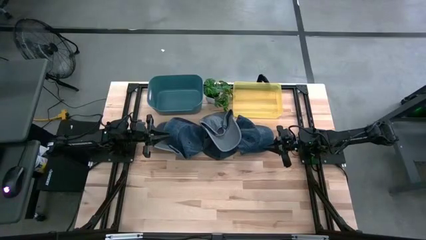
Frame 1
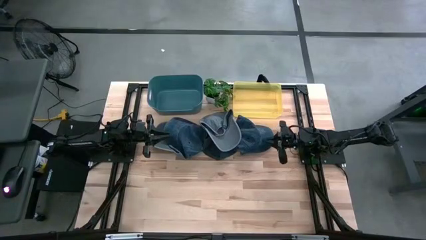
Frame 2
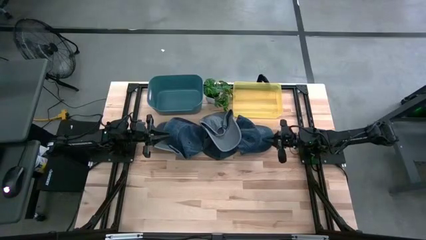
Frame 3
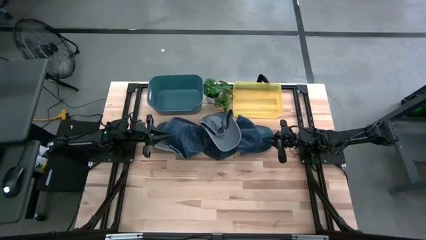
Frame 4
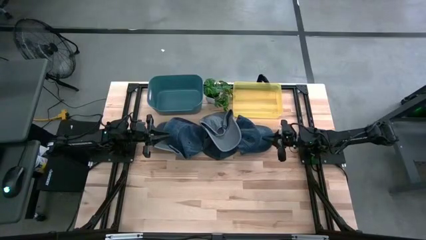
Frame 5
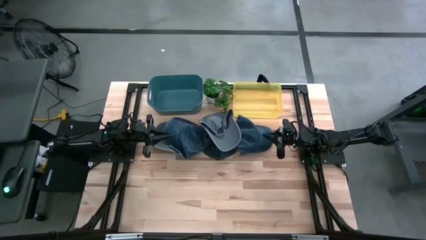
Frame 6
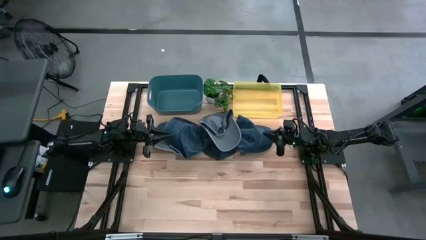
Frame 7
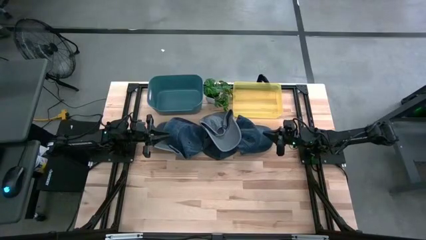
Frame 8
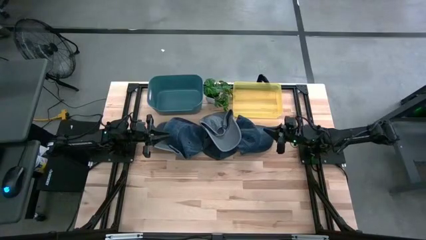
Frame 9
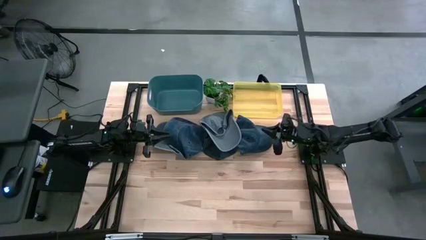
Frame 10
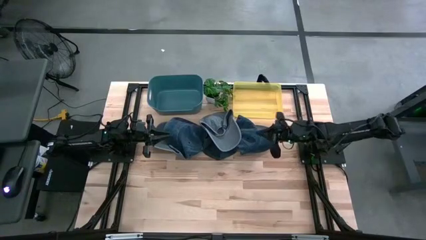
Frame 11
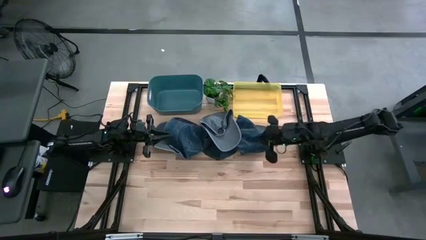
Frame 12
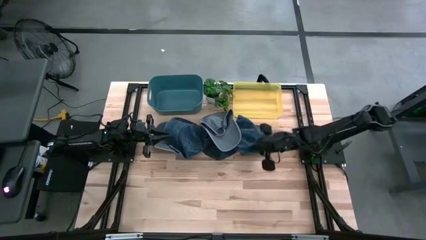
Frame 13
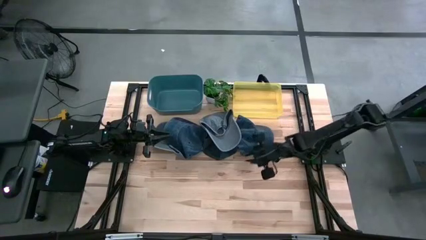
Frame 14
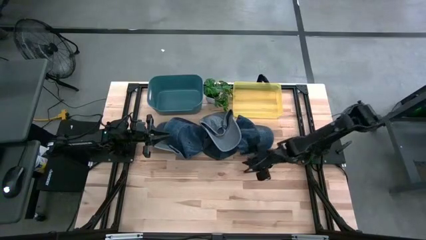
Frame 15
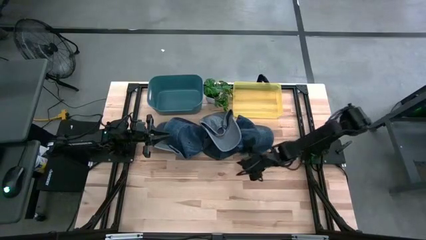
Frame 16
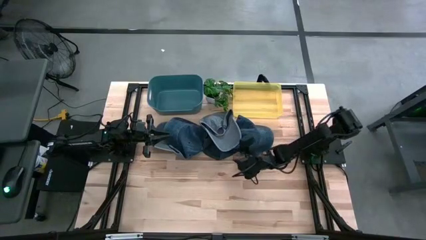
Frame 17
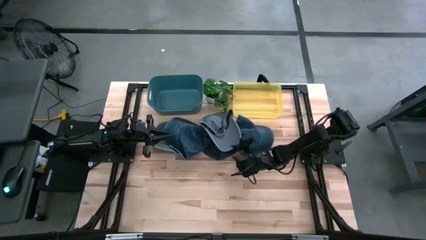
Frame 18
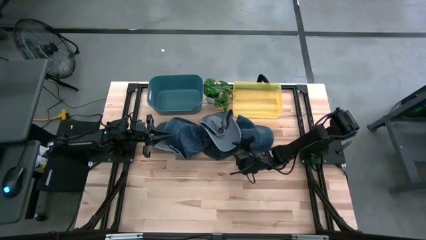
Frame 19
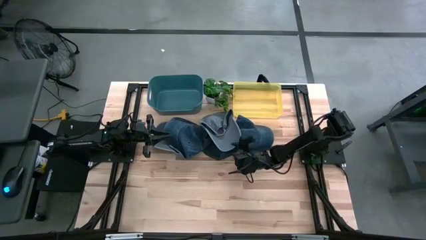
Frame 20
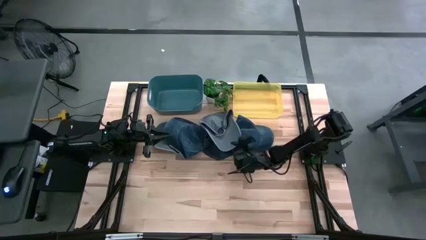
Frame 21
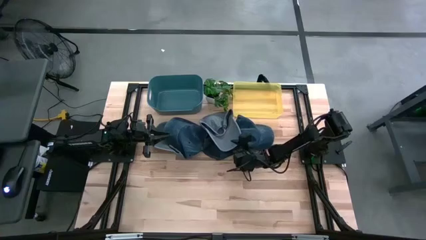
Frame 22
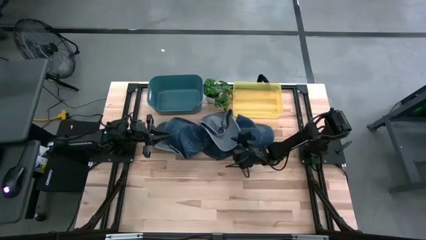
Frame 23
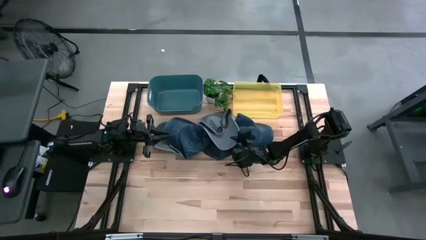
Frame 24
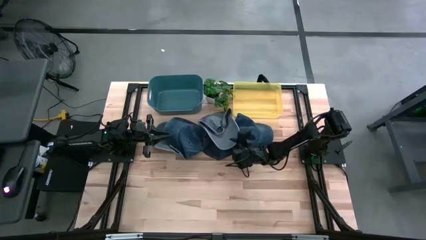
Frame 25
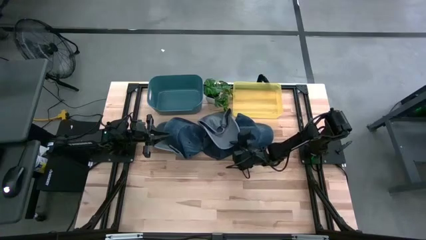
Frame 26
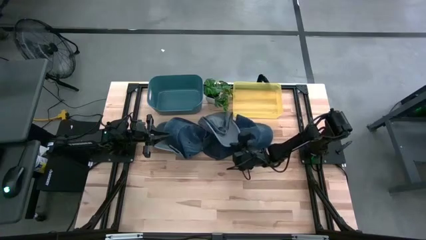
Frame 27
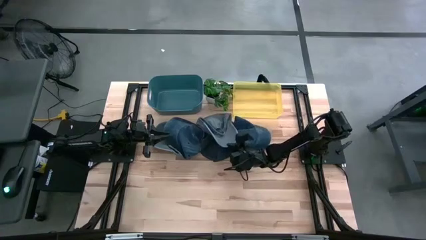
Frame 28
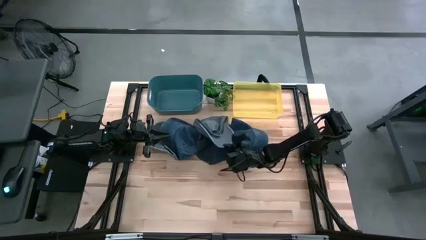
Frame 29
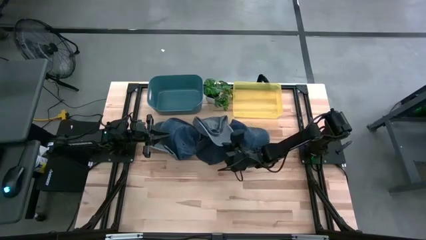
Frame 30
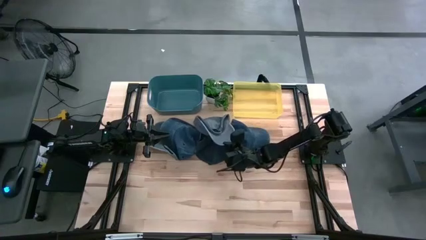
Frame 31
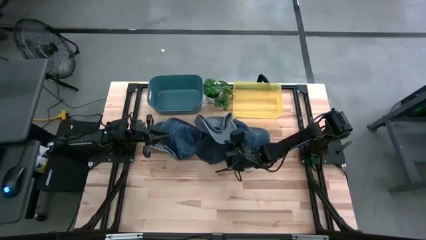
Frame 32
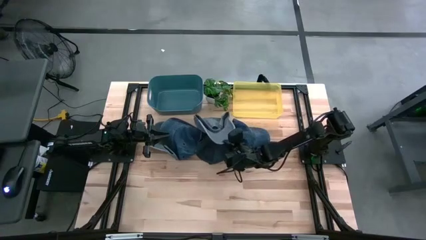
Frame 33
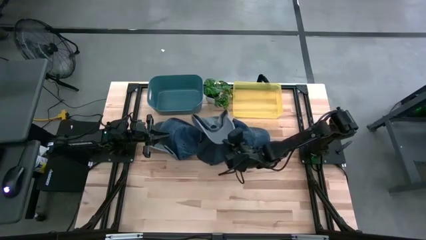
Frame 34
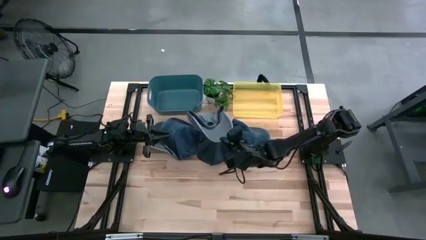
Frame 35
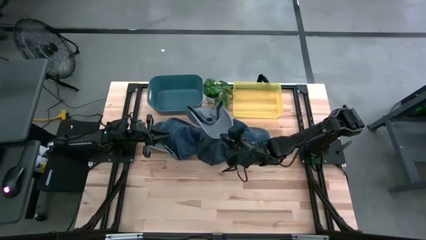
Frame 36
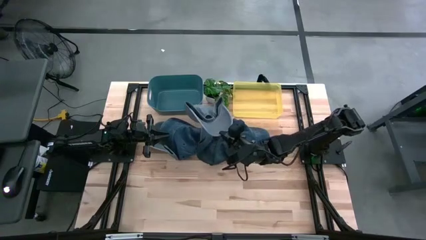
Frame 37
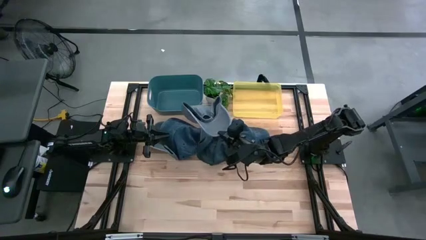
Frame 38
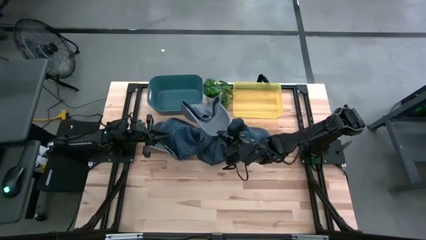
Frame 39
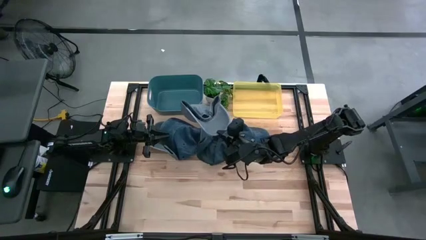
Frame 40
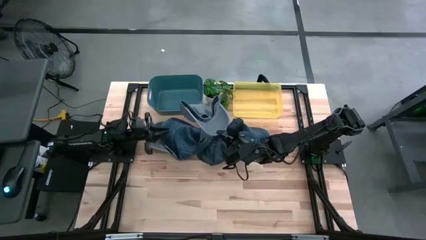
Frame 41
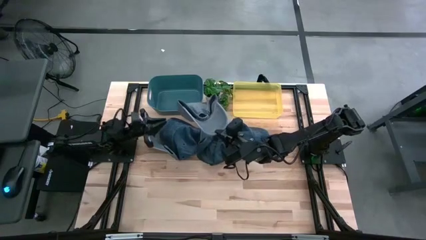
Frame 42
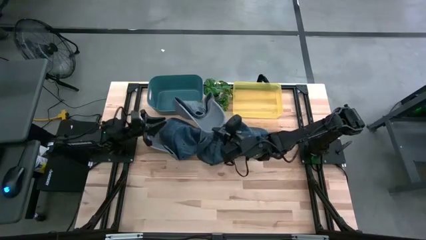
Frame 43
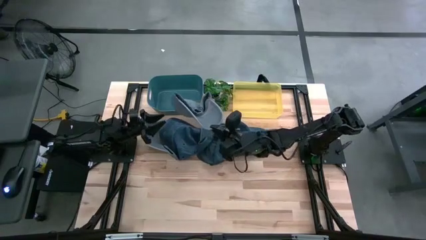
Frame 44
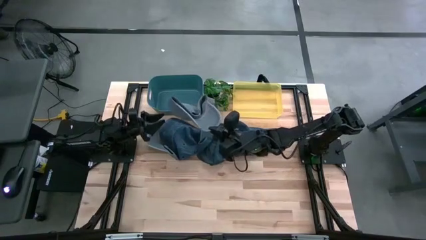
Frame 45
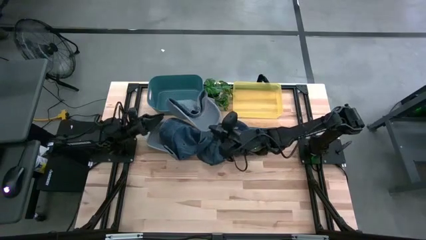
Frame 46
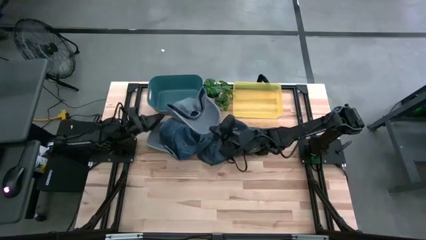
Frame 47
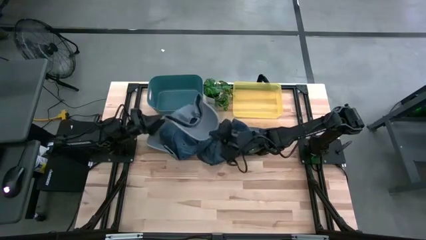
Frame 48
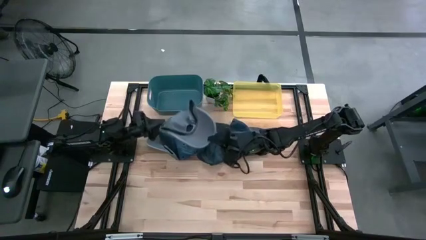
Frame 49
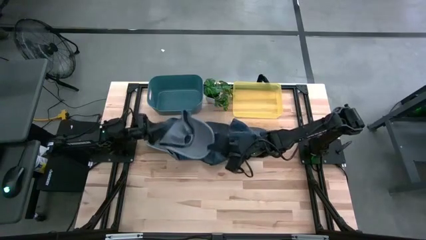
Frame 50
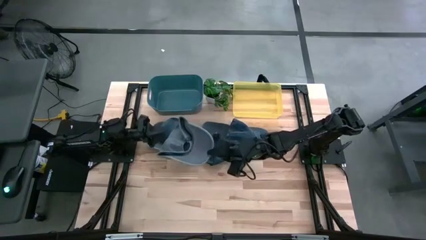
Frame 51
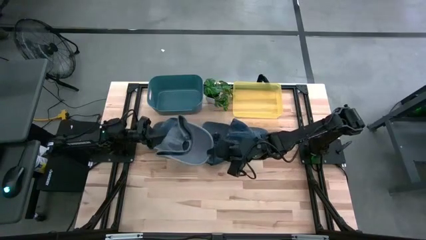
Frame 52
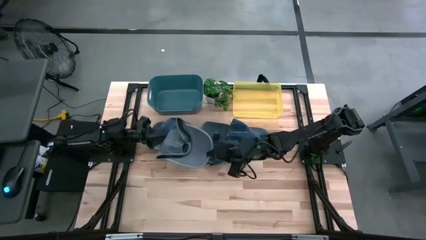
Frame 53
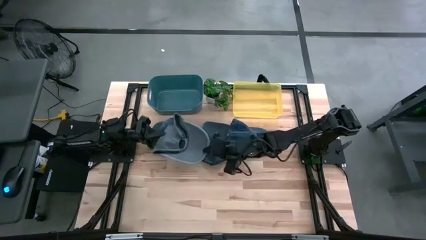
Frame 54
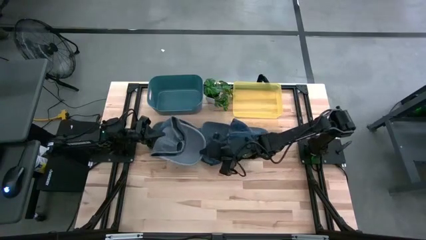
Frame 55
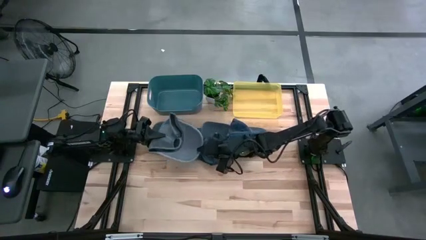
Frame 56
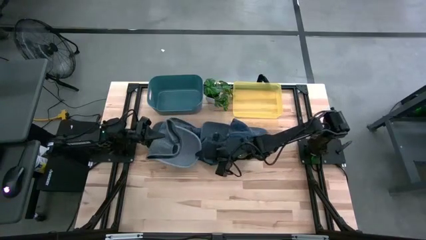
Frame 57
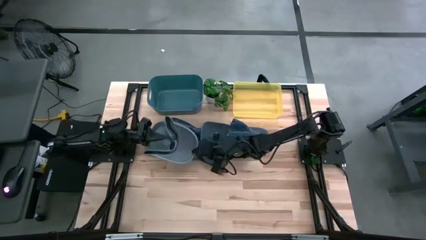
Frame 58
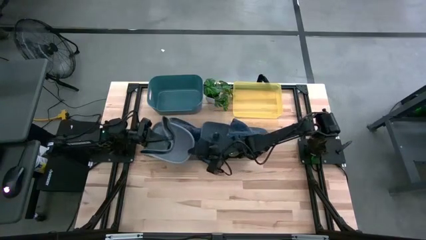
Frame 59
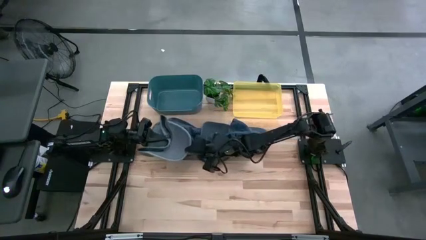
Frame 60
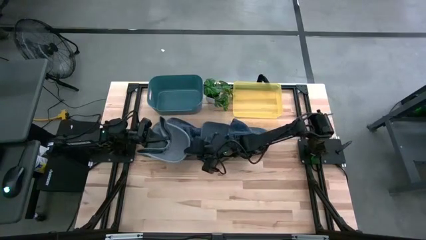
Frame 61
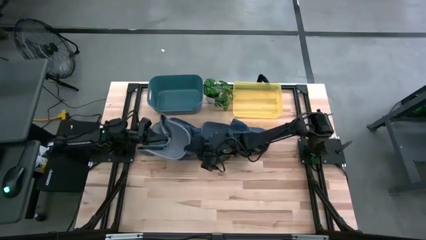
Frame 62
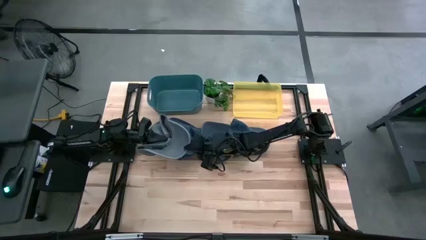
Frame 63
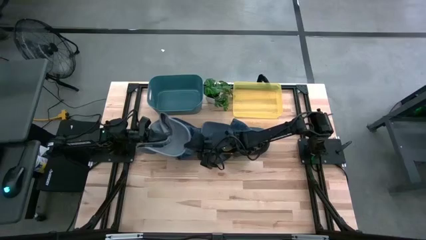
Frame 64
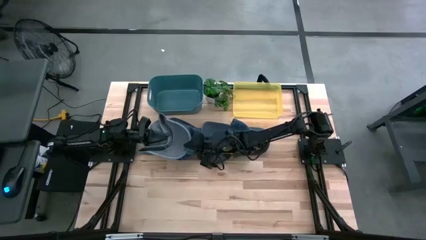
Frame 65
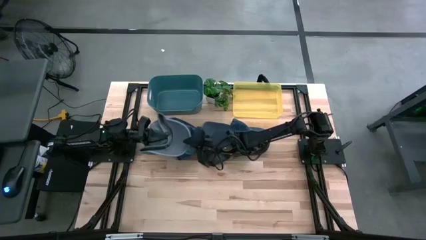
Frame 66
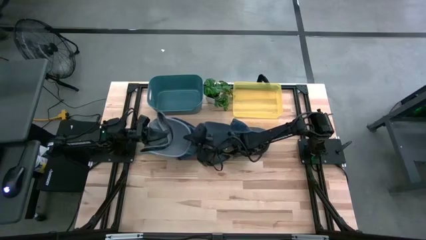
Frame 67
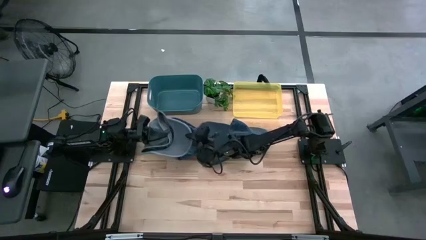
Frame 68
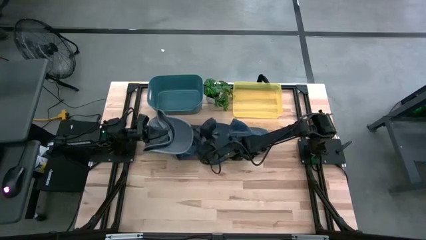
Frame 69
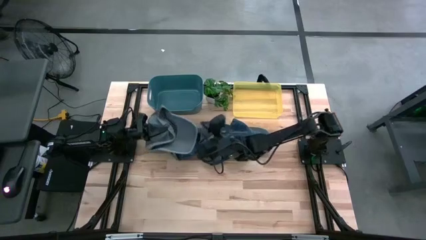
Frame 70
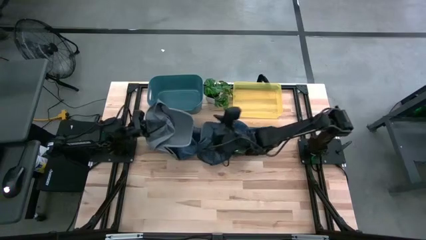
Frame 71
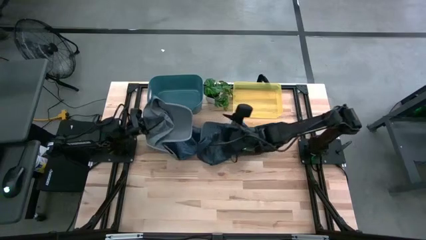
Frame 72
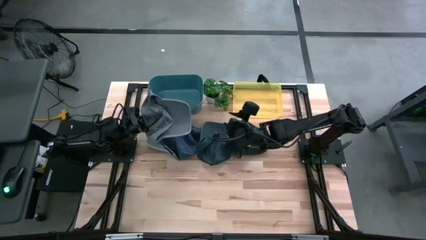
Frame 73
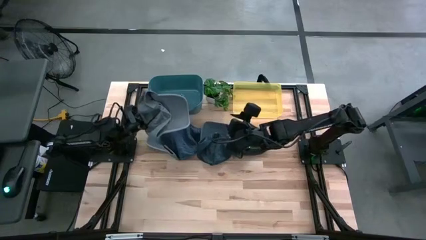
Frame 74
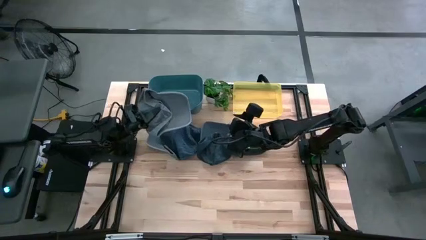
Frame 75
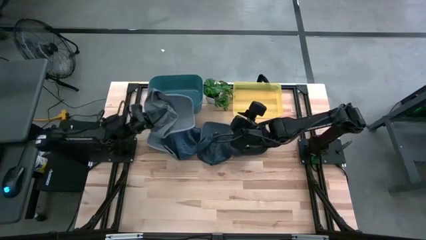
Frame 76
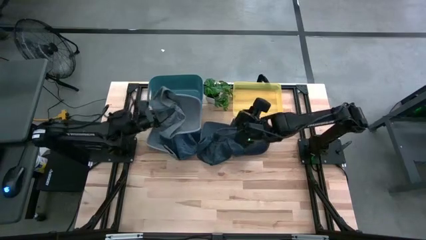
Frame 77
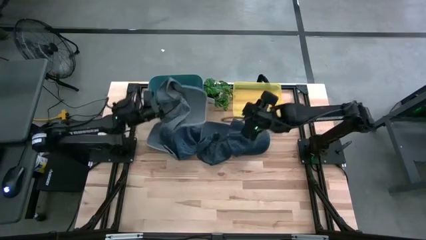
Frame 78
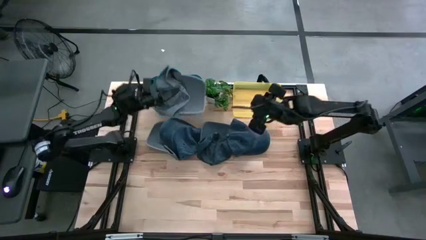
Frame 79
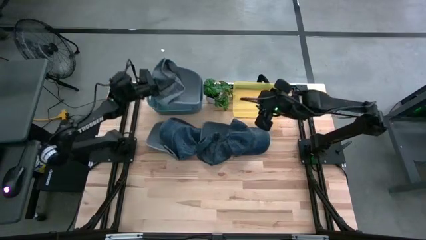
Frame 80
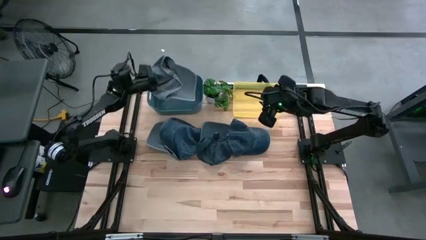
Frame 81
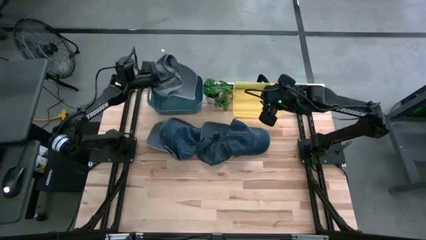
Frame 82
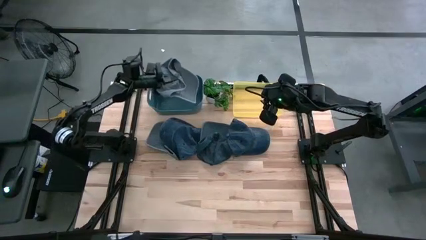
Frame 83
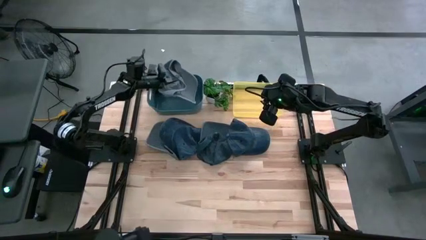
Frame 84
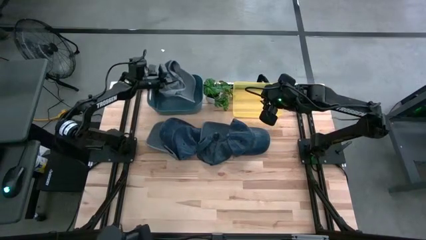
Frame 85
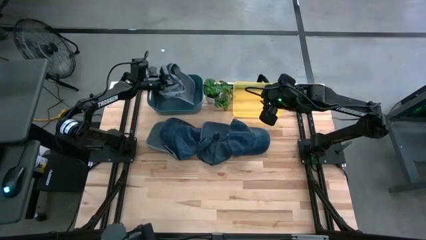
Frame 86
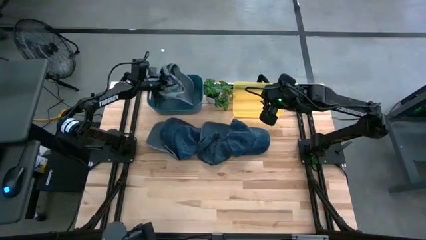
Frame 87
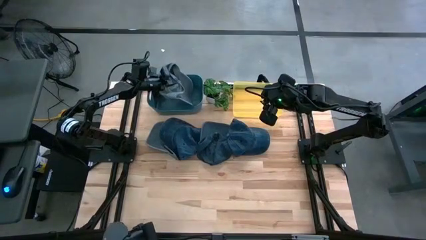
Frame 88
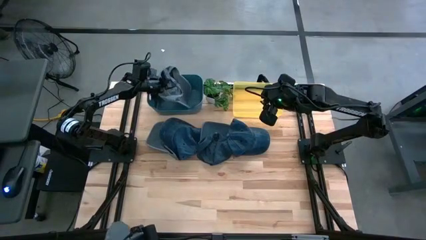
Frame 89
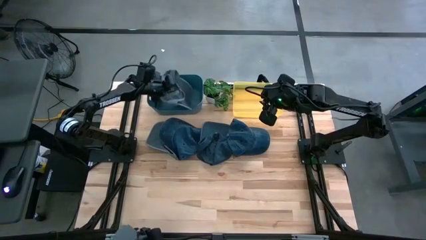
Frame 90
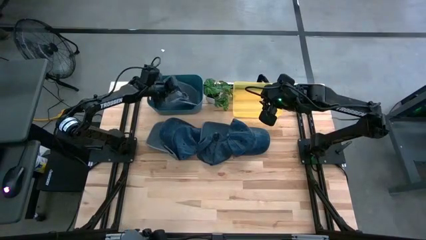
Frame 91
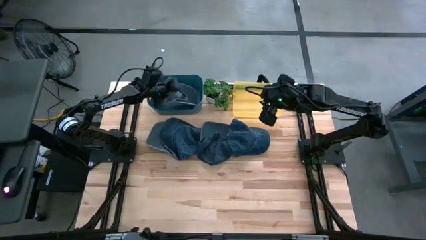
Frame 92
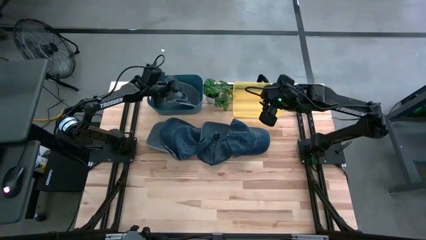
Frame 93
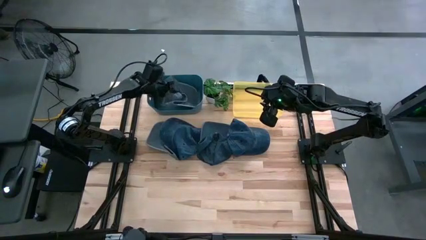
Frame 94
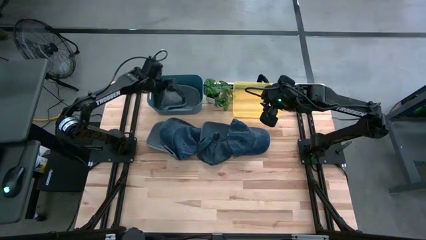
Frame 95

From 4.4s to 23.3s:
Task: Pick & Place hat
Put the right gray cap into the green bin
